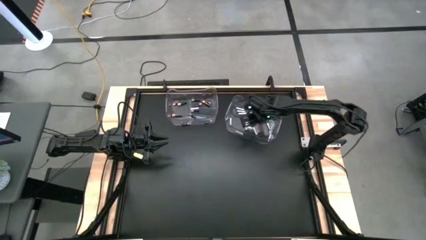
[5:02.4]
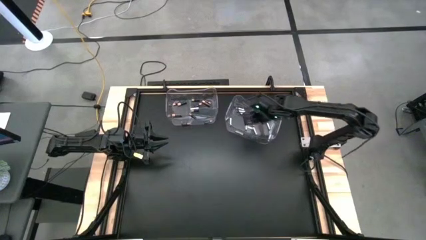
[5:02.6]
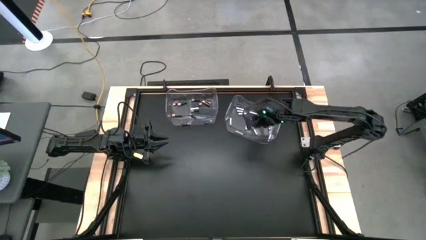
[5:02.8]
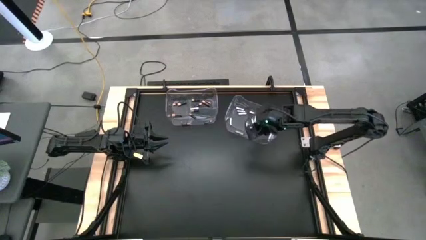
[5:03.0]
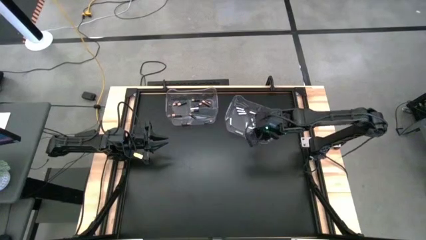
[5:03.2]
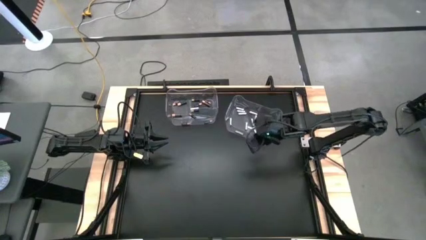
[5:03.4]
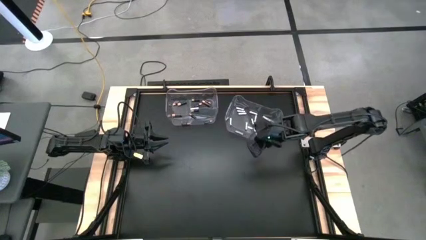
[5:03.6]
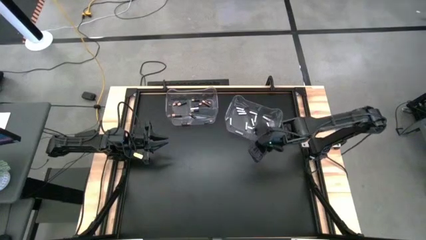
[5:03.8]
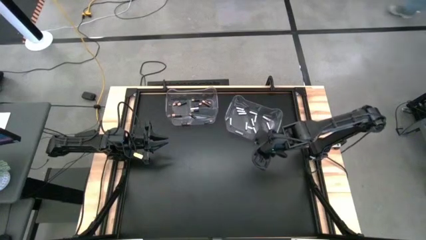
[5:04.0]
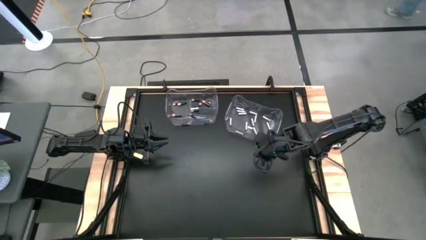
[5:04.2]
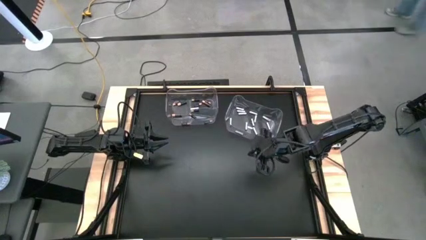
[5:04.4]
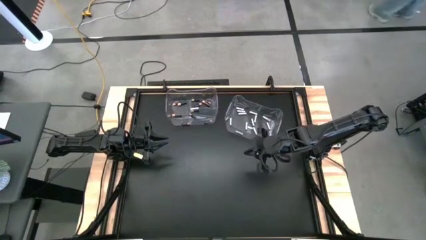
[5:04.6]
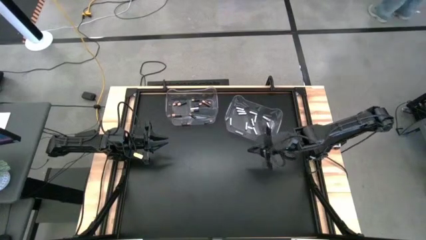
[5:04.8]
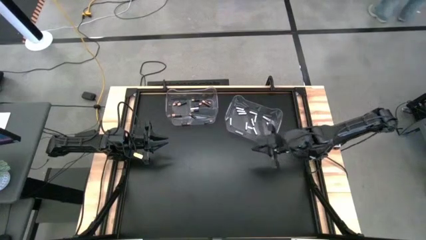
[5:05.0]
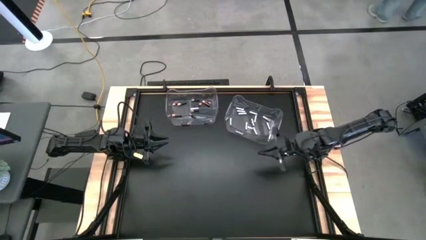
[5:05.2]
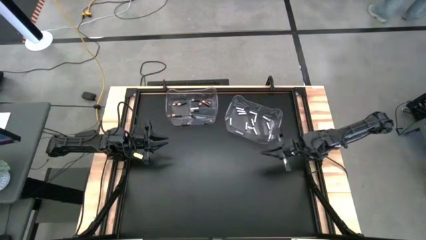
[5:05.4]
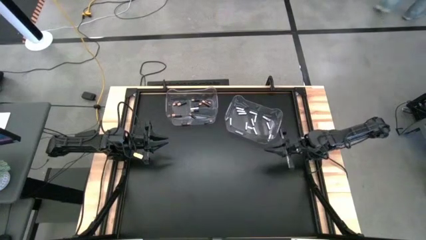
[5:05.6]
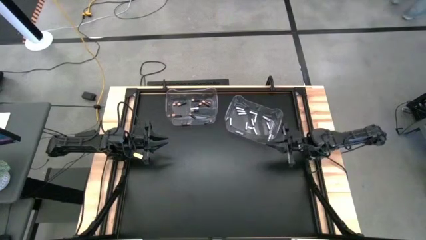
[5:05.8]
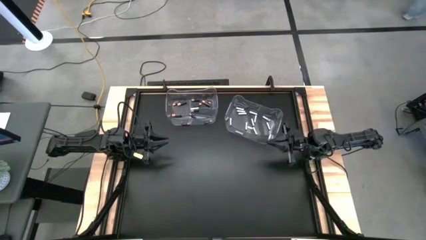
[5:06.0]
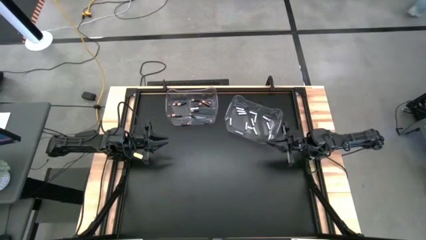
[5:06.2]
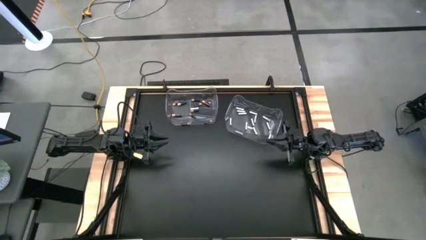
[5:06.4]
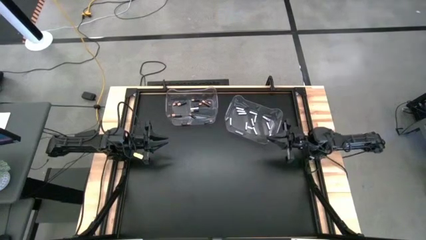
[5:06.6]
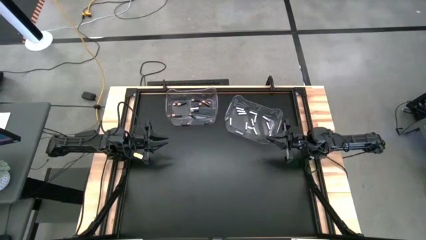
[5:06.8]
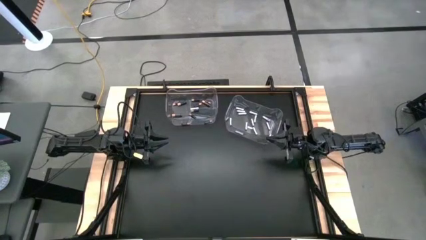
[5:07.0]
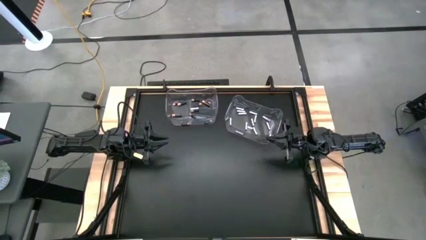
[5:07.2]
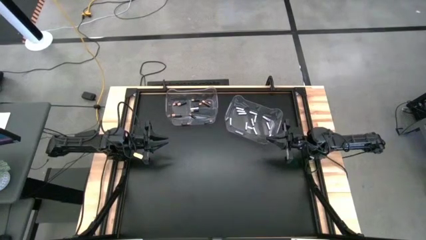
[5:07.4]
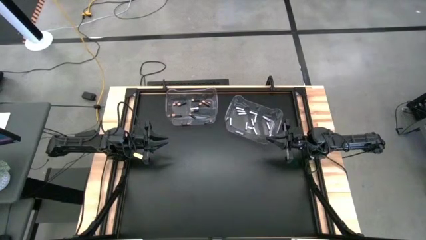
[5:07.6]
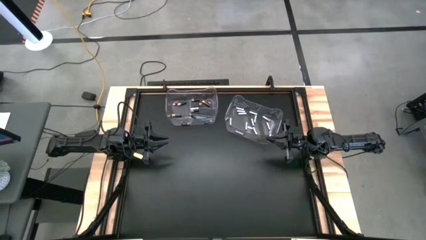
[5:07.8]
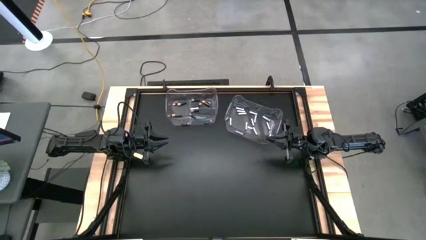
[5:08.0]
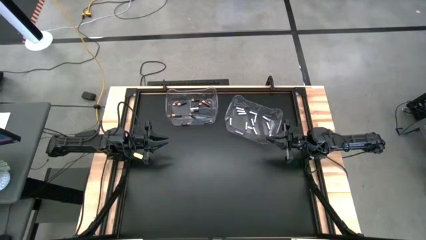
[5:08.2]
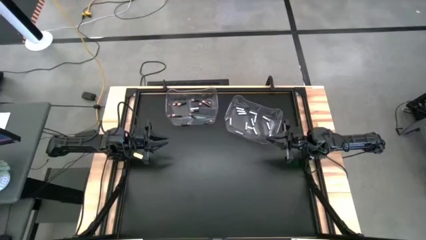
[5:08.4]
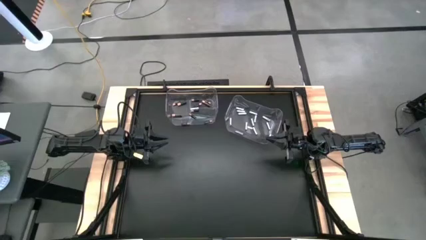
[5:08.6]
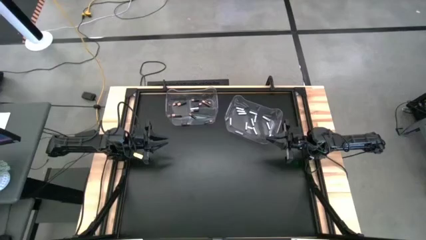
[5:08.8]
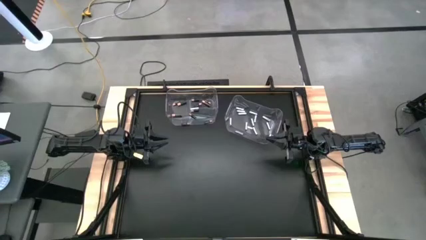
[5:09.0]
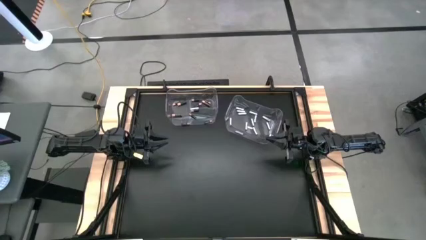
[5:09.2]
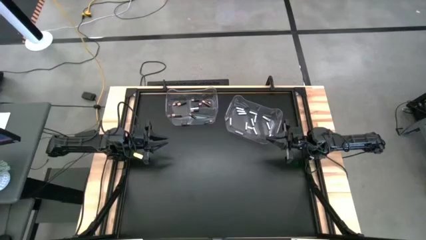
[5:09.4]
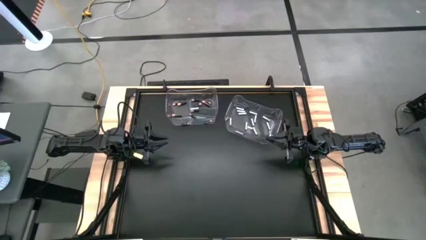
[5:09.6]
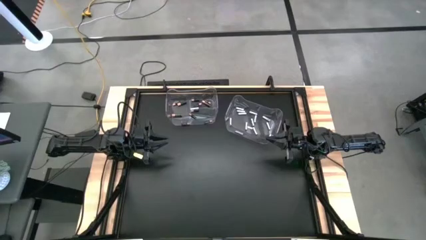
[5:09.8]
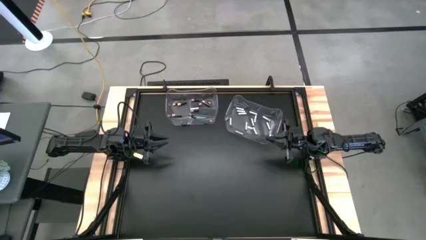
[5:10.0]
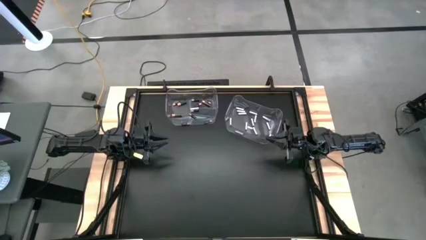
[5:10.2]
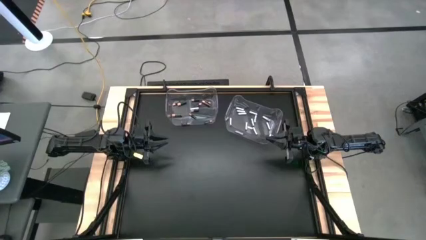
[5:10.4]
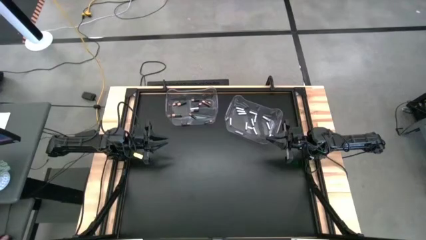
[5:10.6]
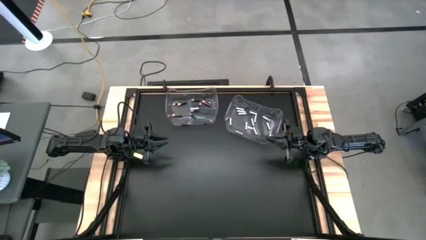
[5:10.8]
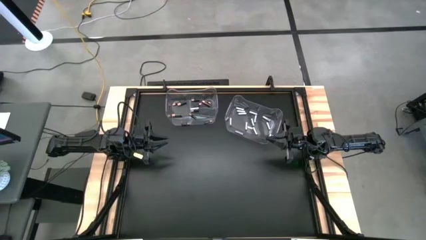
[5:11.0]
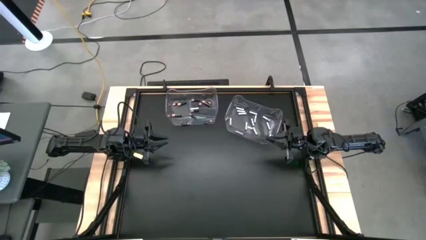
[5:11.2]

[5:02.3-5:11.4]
Task: Sort batteries
Return to Home Position

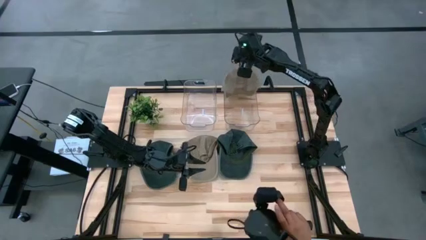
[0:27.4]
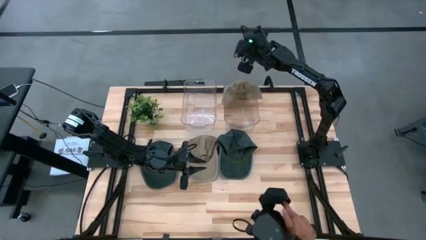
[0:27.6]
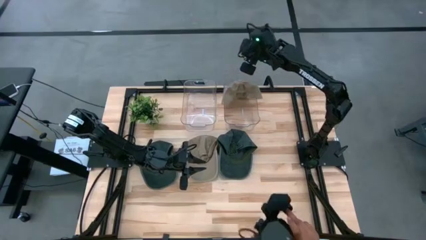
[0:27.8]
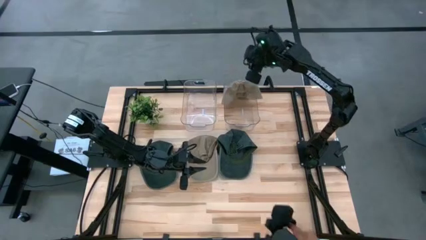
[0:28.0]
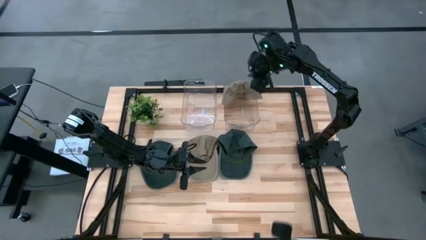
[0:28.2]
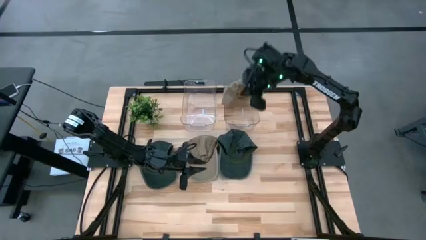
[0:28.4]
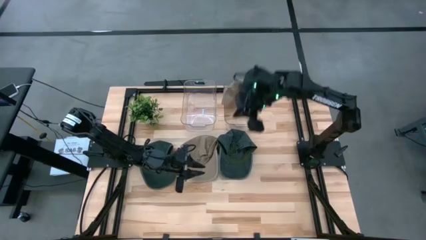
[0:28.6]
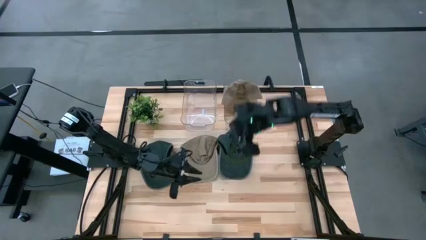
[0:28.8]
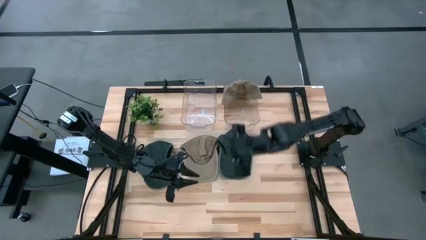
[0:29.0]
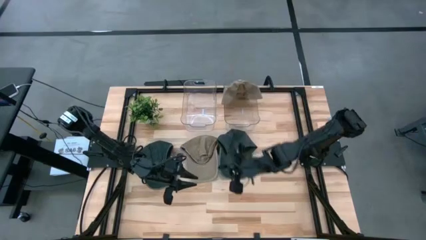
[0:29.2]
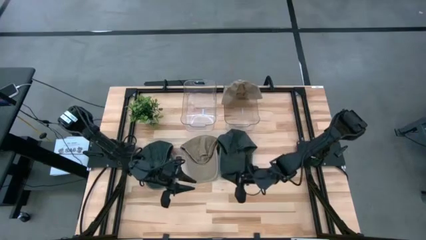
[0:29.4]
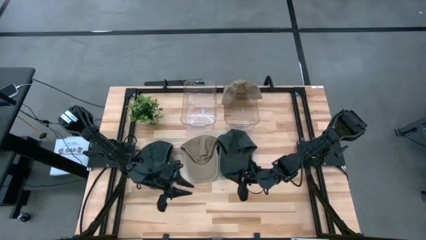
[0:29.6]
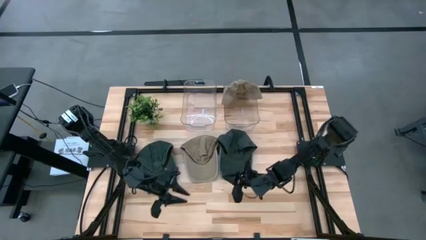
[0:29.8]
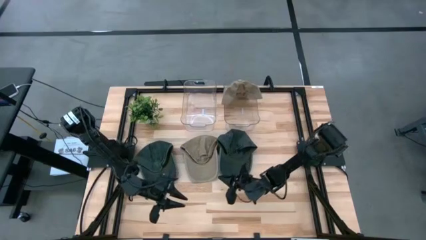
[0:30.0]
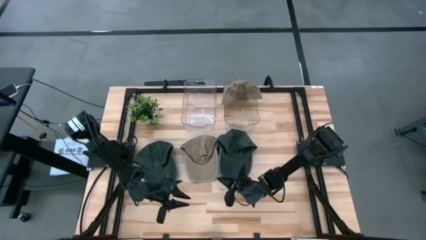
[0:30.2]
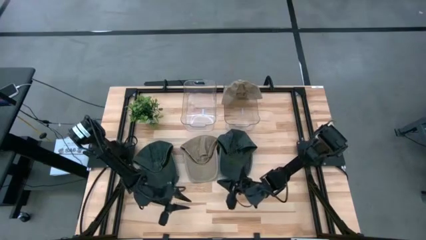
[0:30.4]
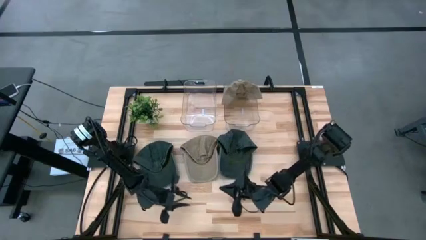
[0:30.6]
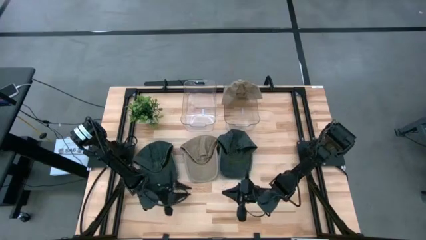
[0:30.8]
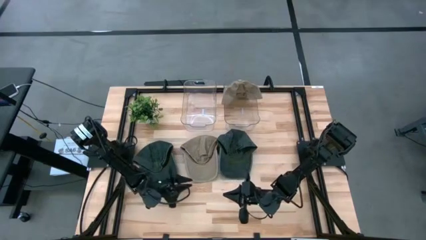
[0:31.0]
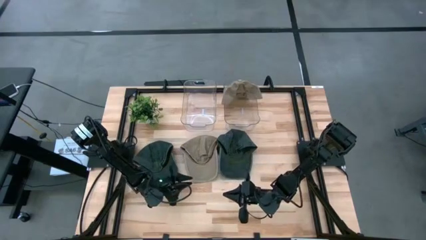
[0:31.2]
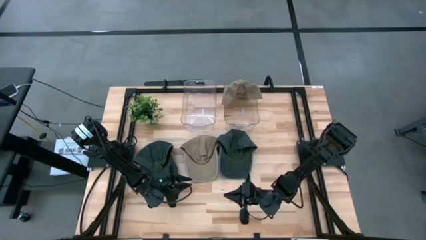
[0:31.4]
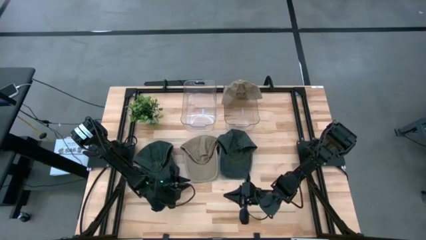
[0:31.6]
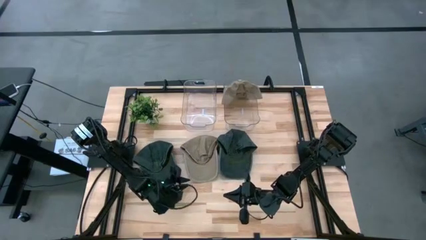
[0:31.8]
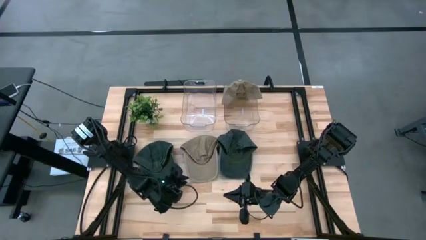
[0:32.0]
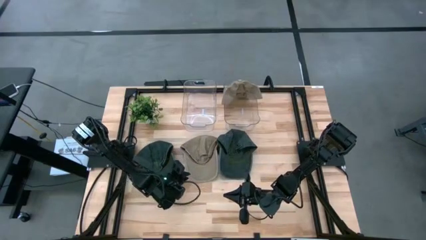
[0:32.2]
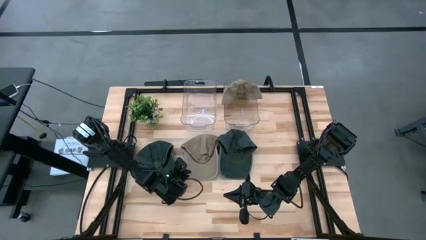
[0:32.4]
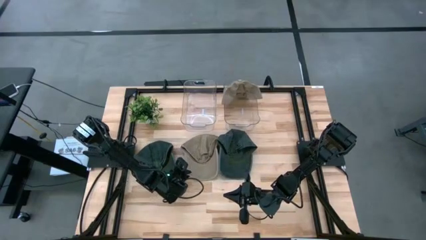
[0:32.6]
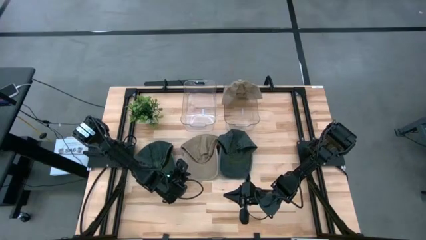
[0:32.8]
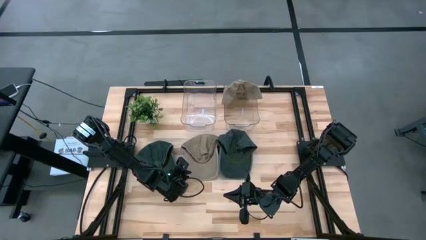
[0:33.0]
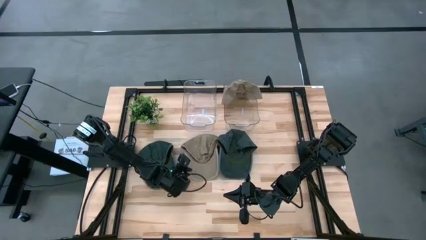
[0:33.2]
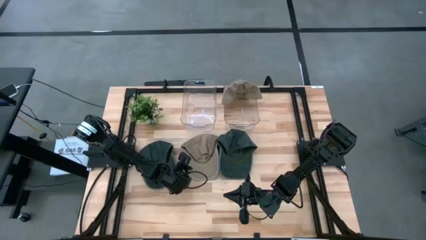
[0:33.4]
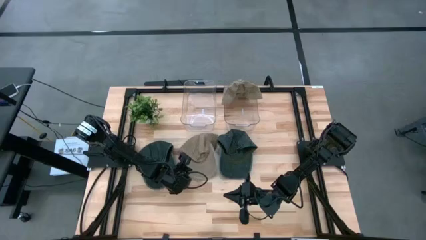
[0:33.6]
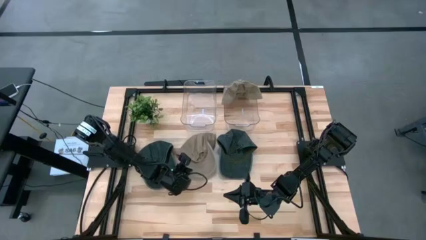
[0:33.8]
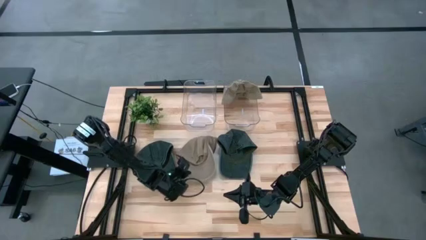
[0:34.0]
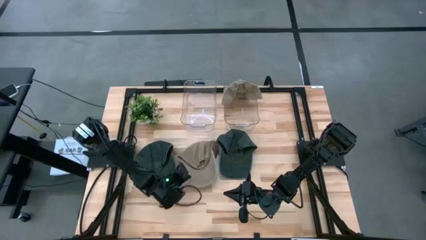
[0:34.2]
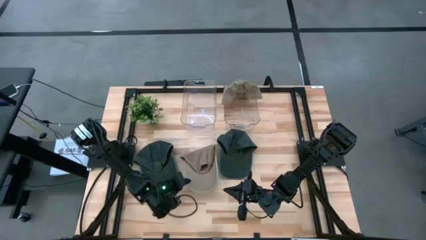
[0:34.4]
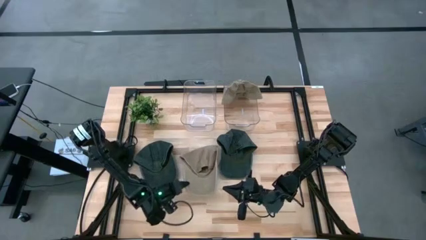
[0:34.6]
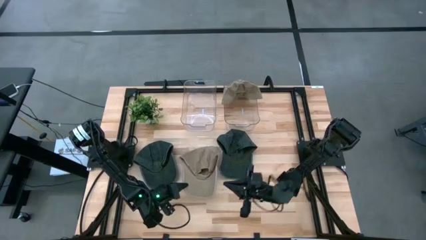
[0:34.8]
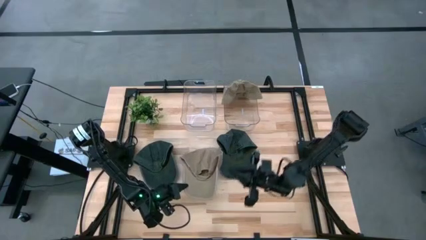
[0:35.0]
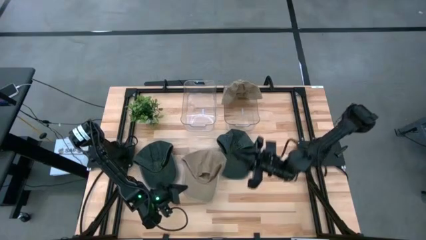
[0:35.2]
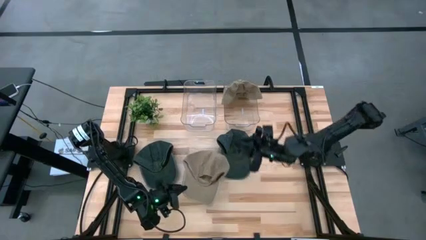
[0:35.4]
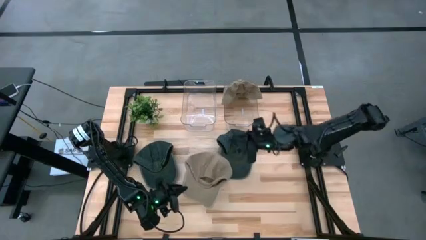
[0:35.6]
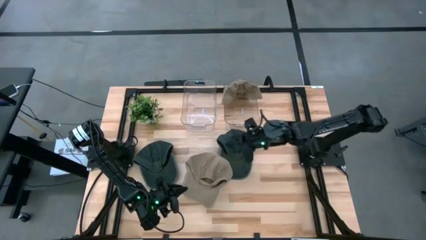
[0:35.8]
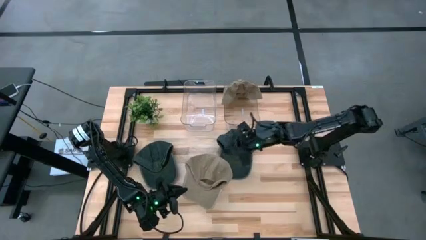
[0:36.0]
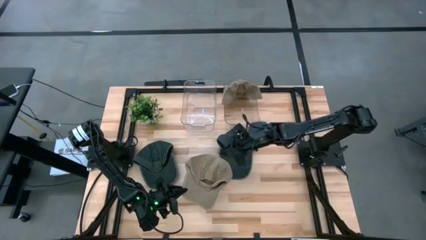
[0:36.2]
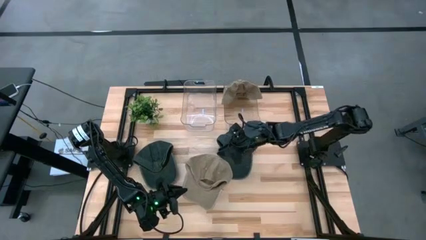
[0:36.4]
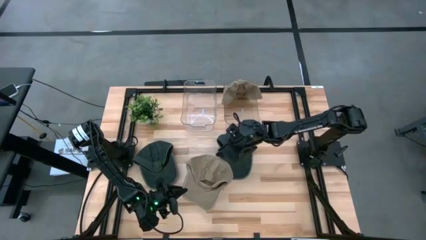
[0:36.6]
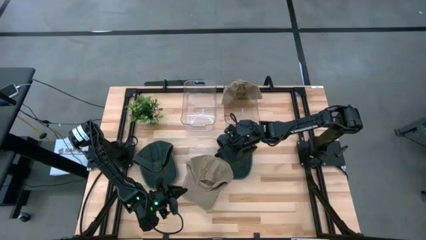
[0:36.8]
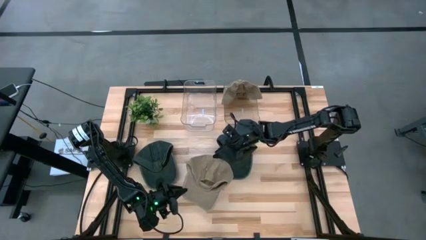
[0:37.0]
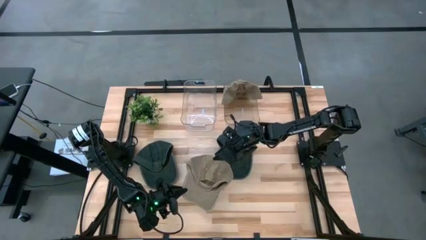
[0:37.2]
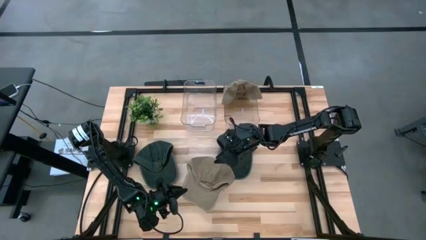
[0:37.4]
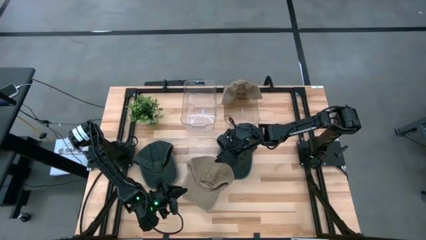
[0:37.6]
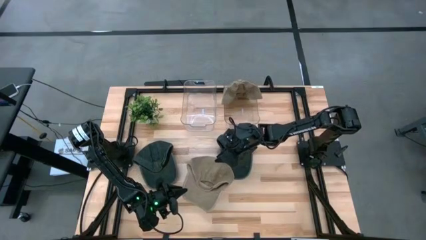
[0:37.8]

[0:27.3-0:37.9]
Task: Pick & Place hat
Put the brown cap into the right transparent bin
